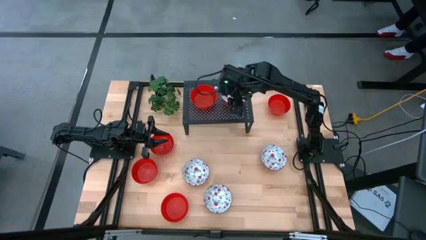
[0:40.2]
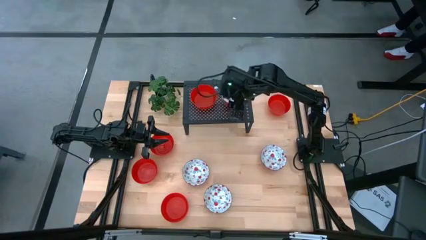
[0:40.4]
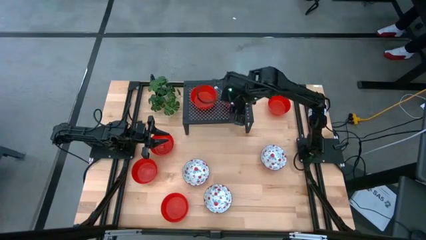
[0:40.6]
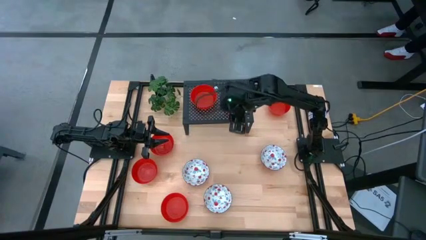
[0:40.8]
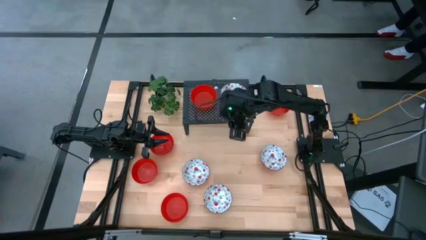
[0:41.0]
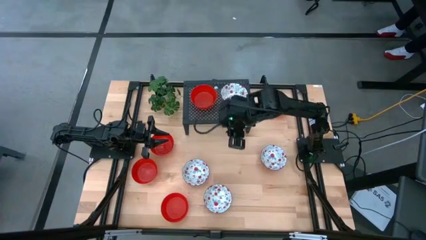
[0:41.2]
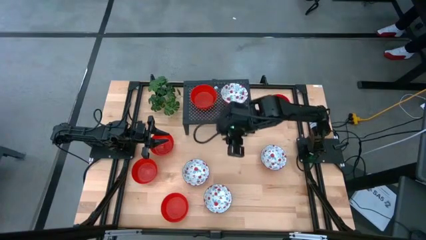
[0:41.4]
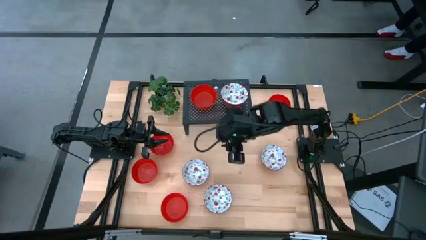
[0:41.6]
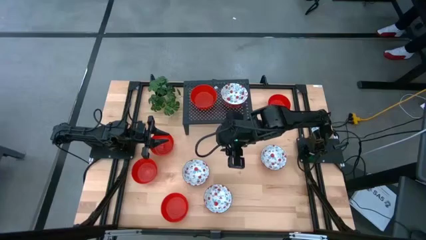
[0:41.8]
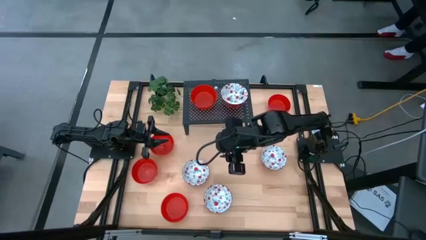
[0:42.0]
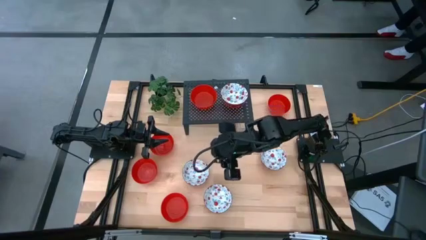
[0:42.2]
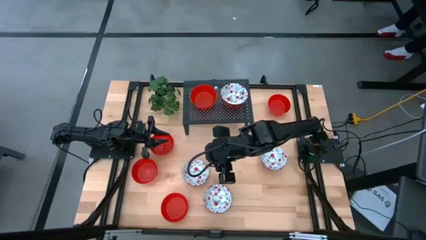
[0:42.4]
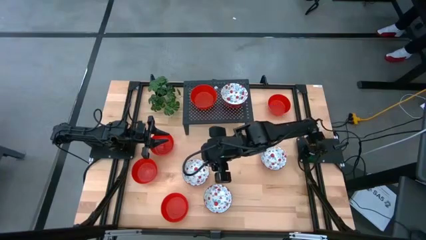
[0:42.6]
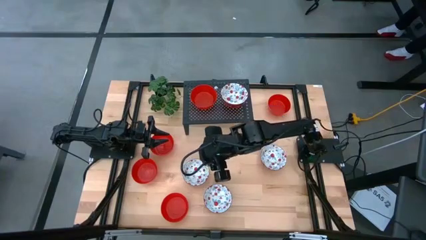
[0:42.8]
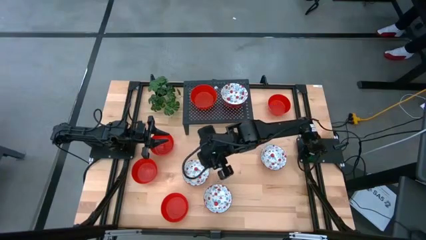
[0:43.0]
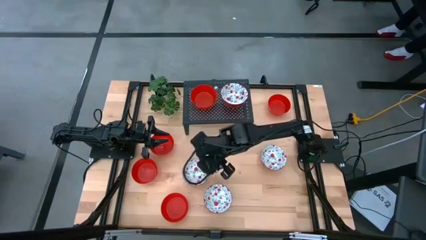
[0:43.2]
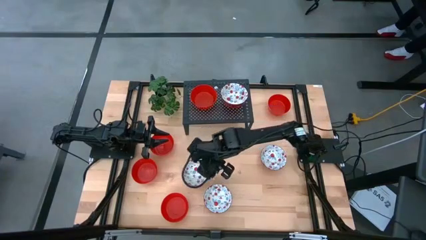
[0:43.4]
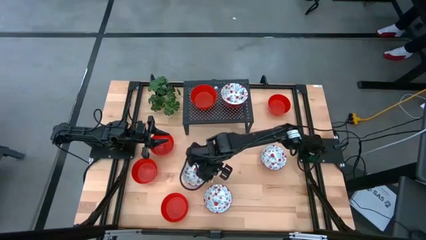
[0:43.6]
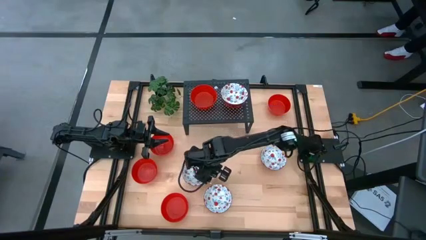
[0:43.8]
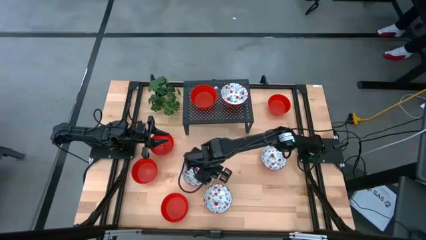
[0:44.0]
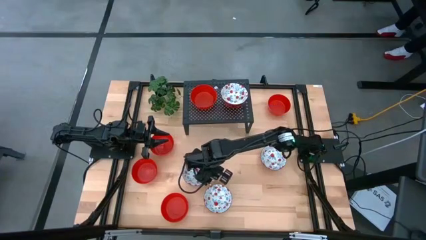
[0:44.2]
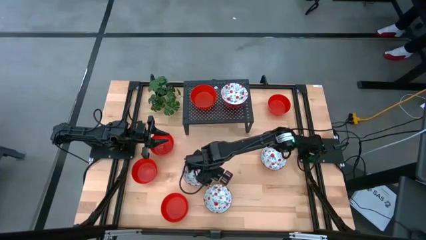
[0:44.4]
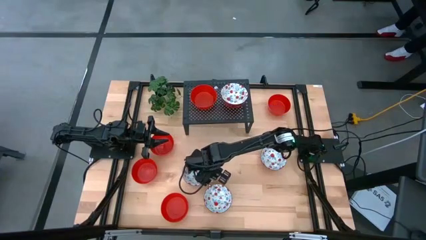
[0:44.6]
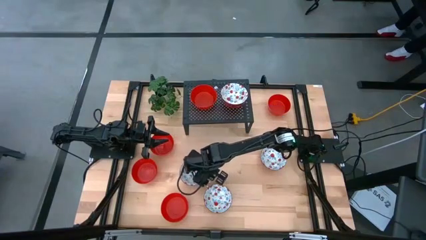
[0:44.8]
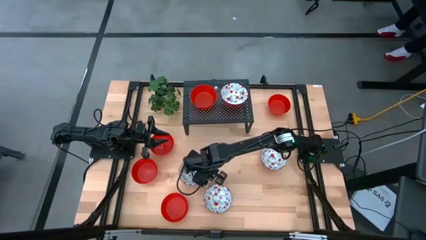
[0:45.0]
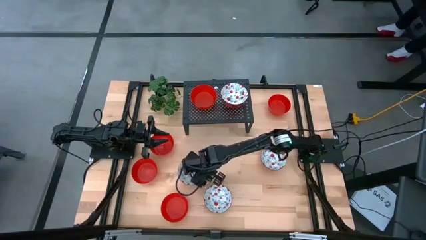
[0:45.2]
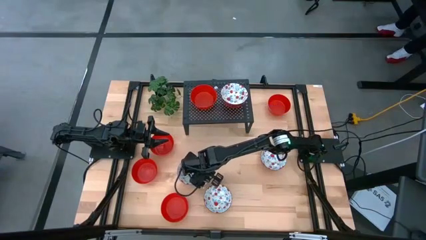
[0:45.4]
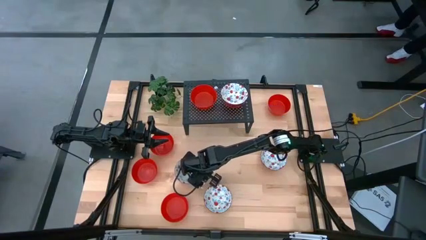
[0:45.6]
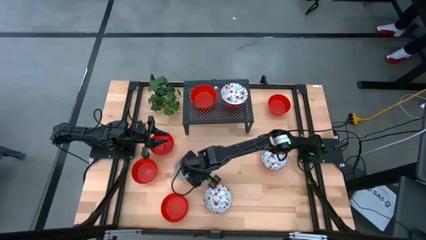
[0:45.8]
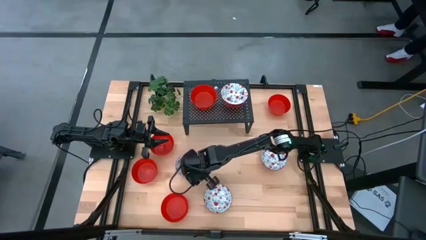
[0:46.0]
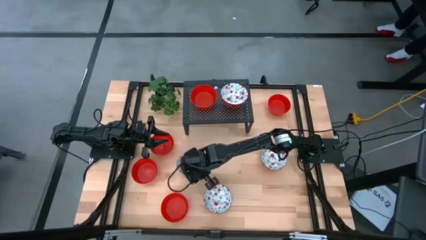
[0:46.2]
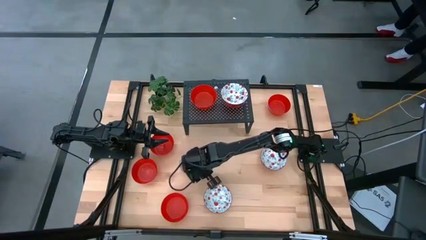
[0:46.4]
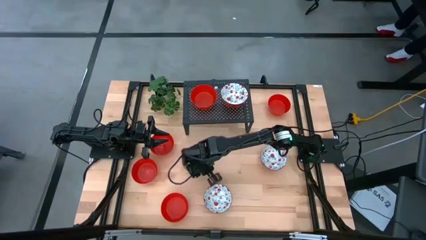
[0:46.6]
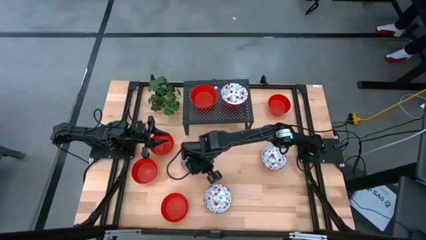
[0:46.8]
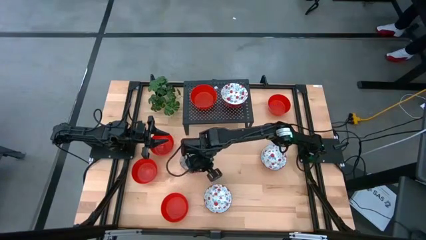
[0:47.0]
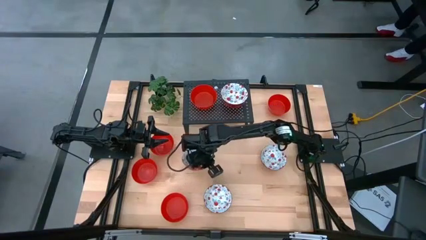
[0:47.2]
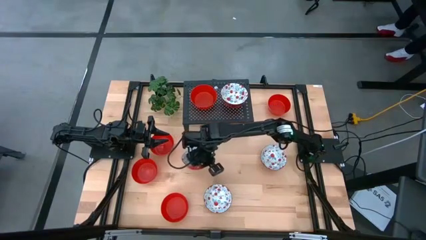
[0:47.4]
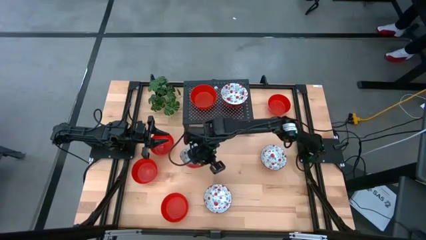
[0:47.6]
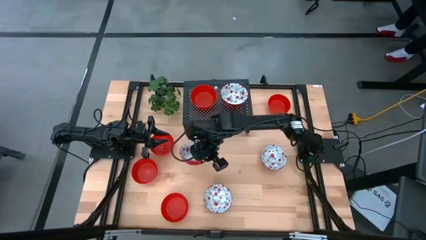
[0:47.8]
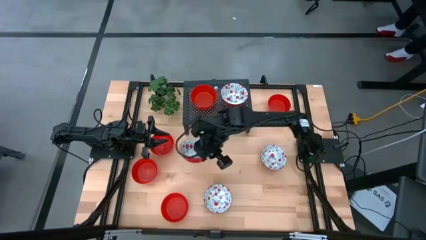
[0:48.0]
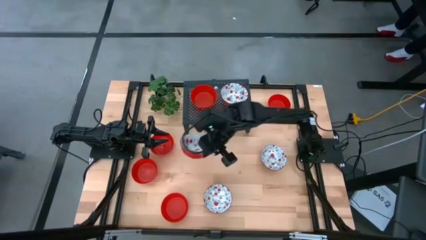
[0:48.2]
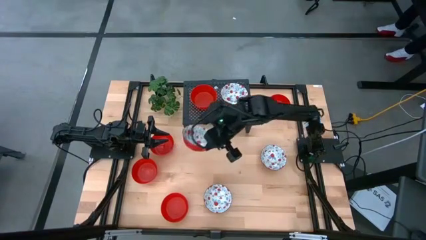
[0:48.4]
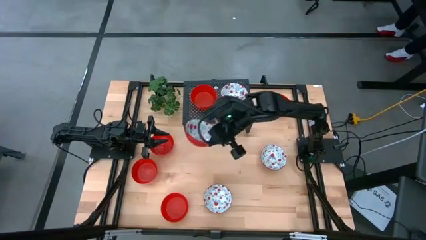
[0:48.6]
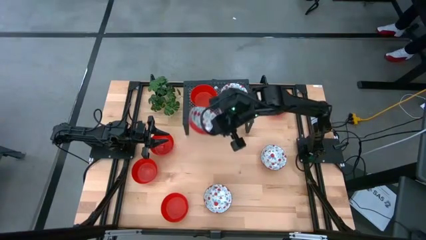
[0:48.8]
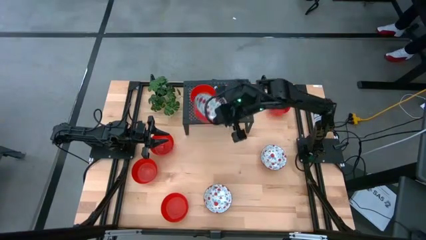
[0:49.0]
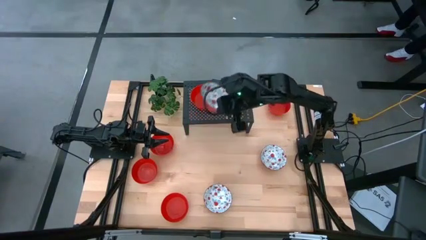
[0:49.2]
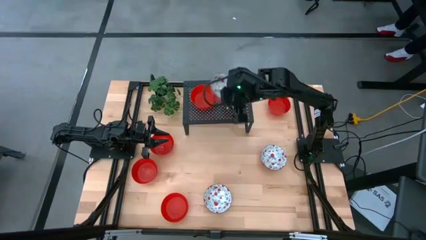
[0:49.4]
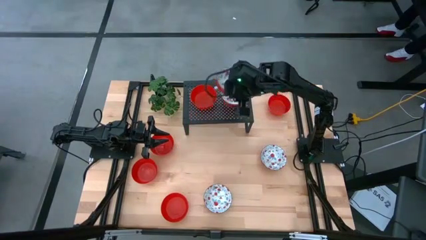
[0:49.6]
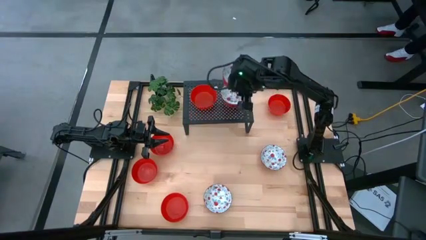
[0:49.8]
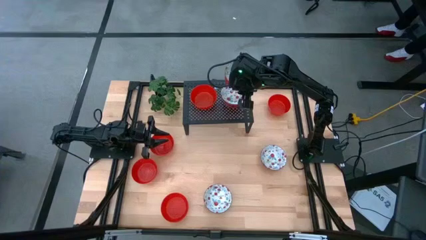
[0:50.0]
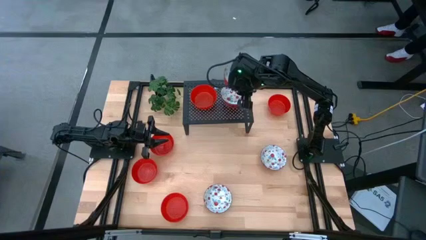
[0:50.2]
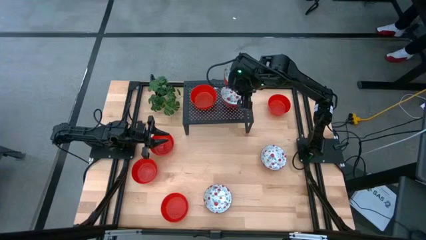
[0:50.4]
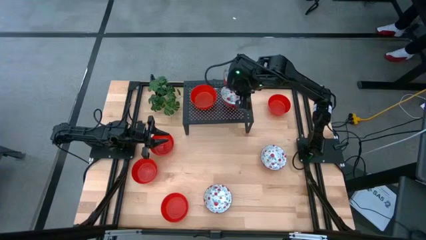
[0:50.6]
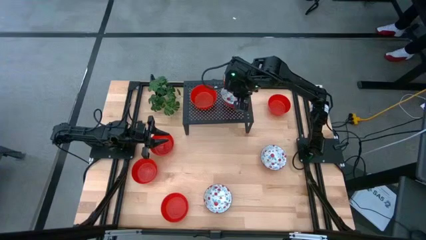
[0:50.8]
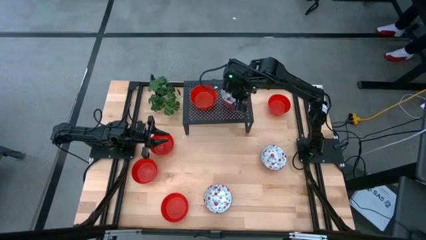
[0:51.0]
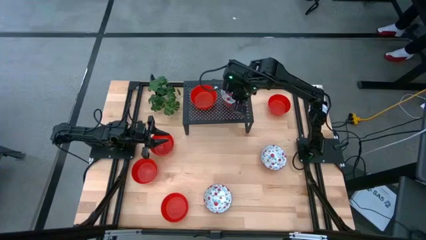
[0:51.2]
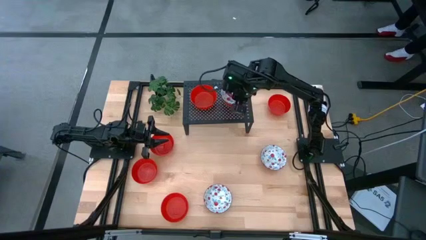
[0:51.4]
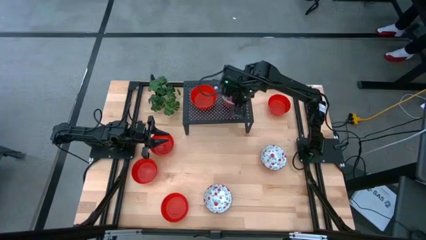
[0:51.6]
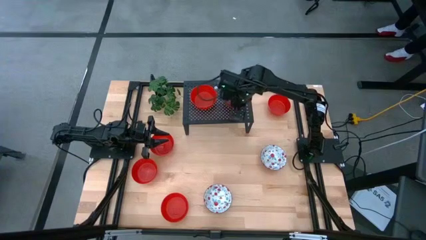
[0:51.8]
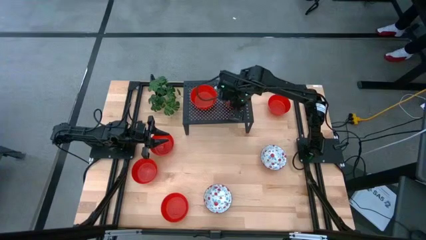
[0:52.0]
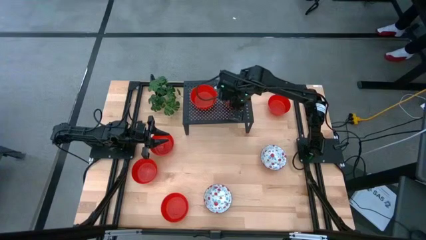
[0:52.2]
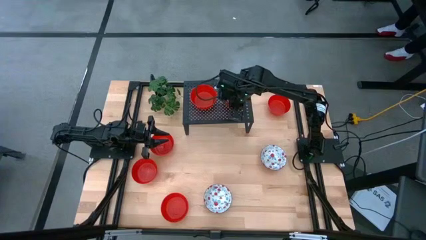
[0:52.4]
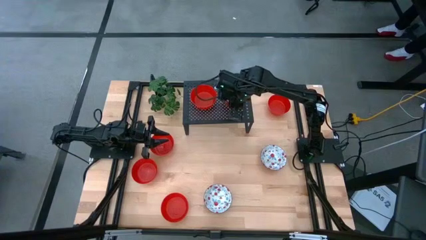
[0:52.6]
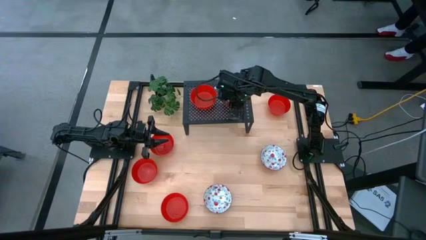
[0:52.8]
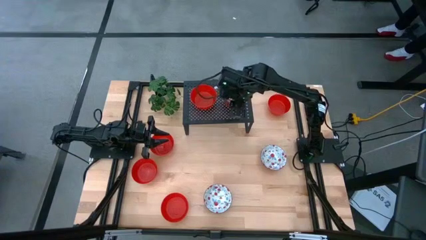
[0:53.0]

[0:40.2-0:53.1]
Task: Pick & Place Mini bowls
Stack the middle white bowl on the top of the white bowl on the shelf
